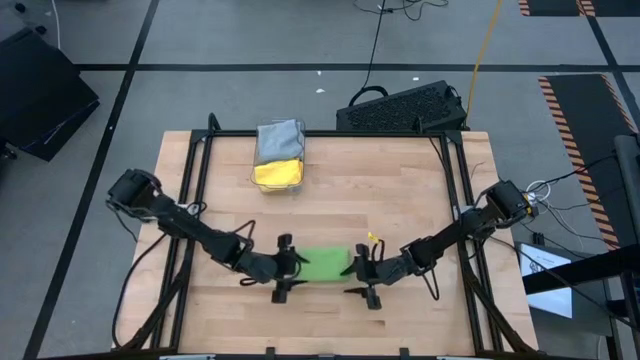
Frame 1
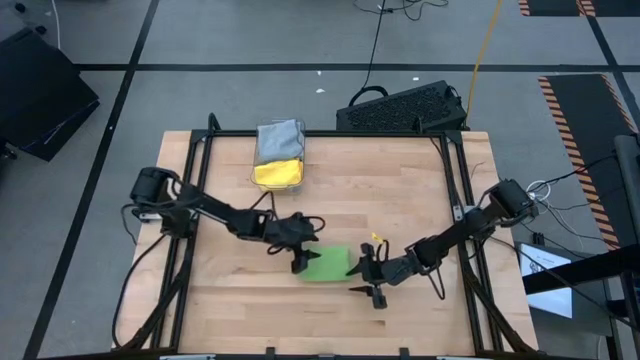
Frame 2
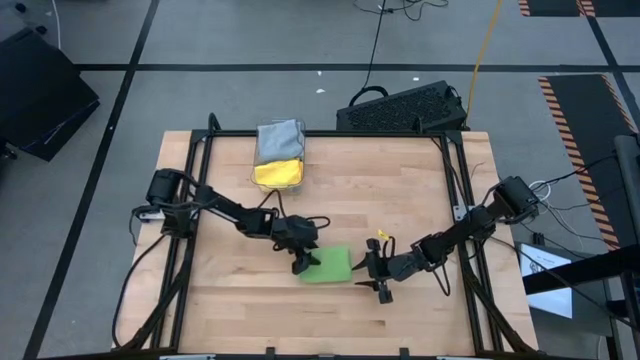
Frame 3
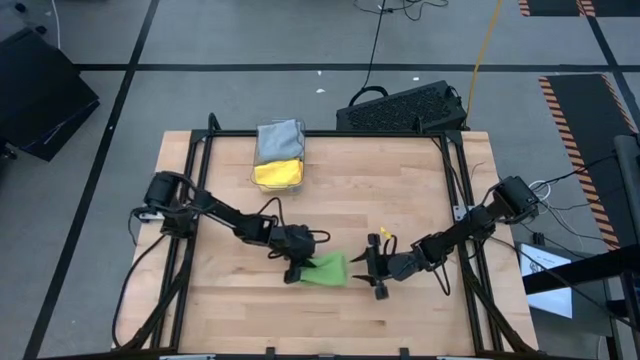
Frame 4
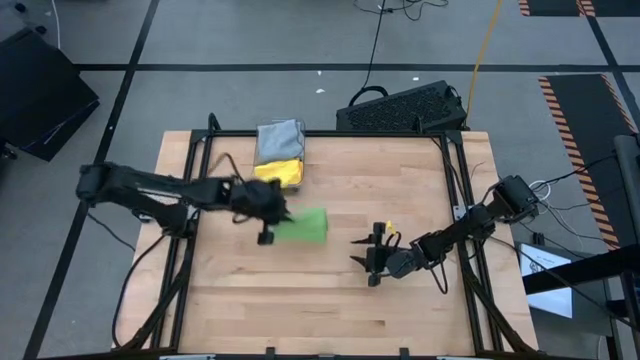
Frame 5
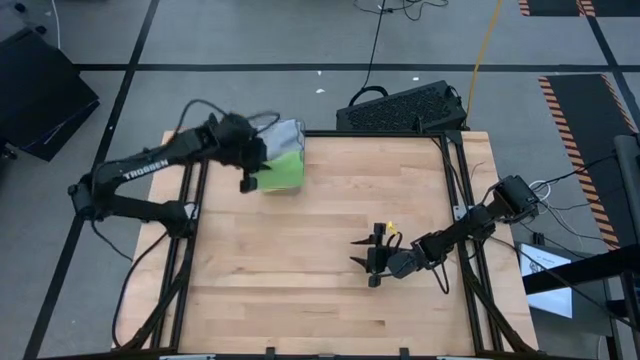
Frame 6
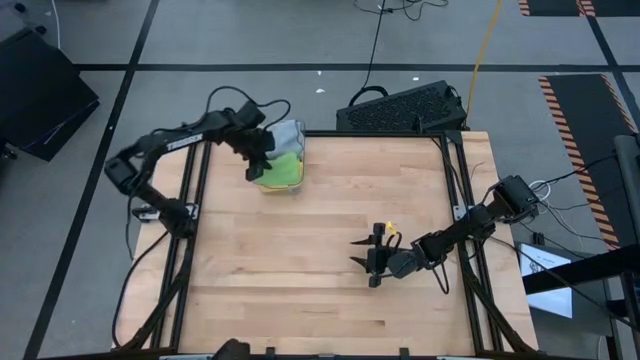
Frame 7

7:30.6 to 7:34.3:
Task: Fold microfiber towels
Put the green towel into the transparent bin

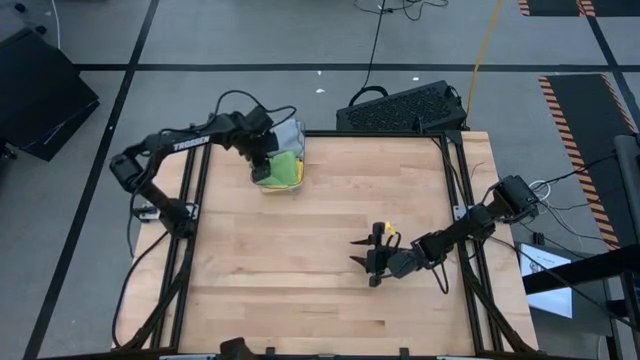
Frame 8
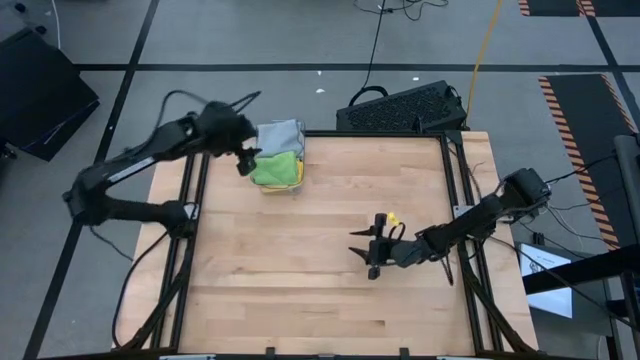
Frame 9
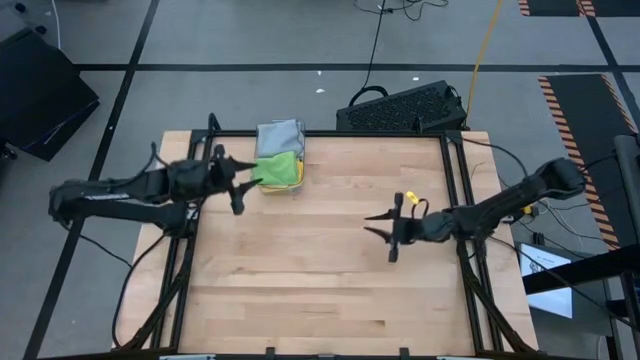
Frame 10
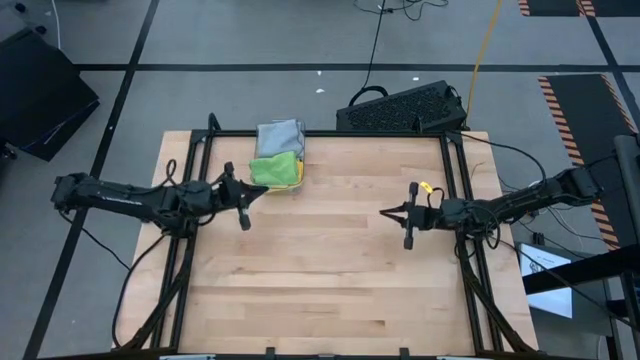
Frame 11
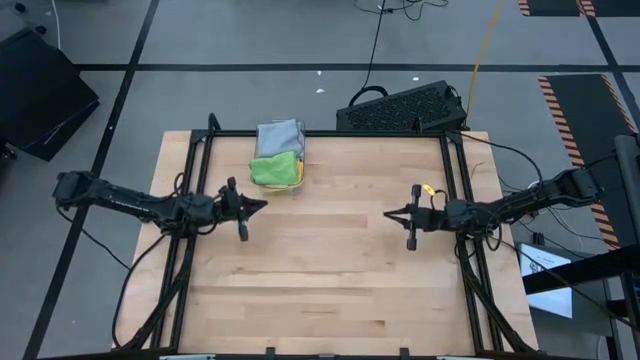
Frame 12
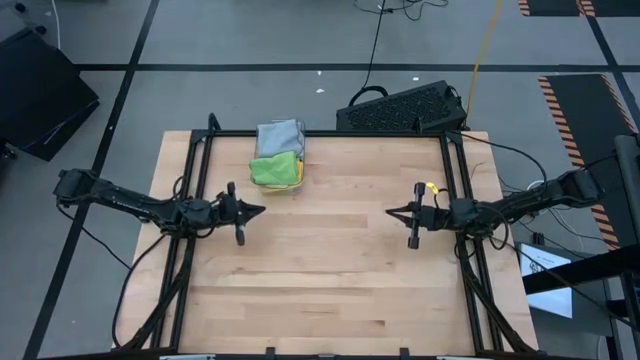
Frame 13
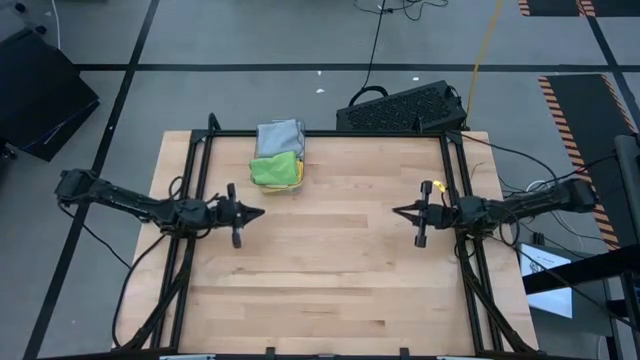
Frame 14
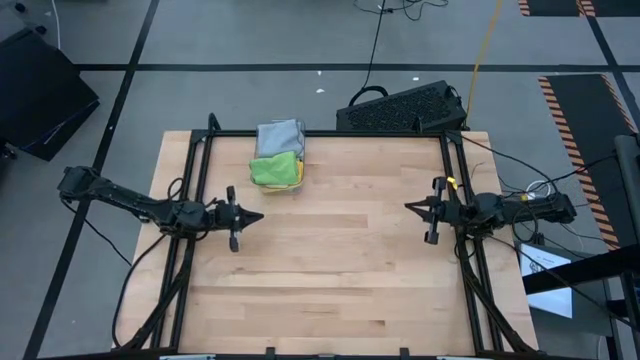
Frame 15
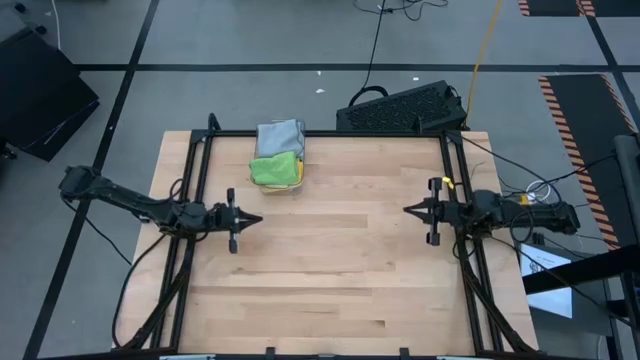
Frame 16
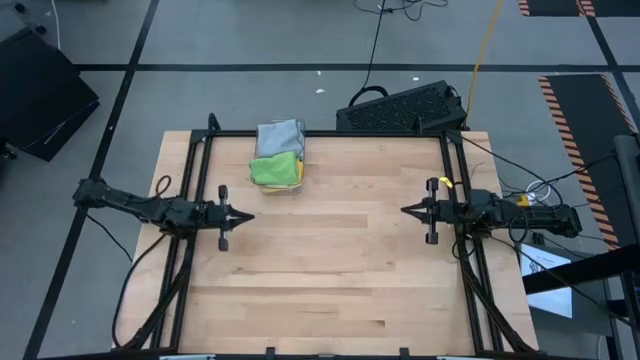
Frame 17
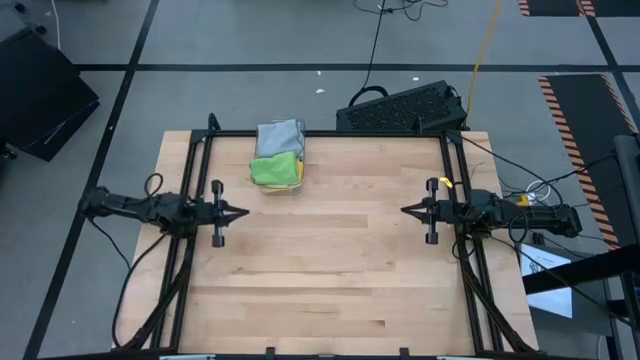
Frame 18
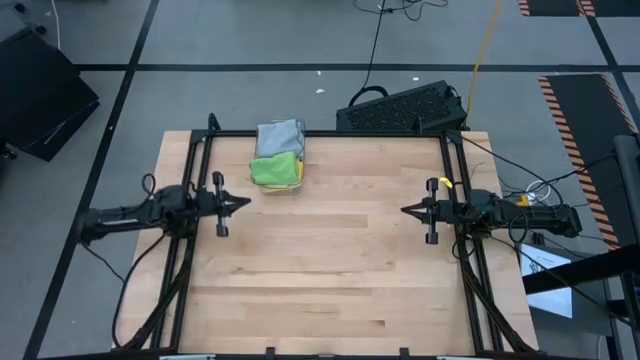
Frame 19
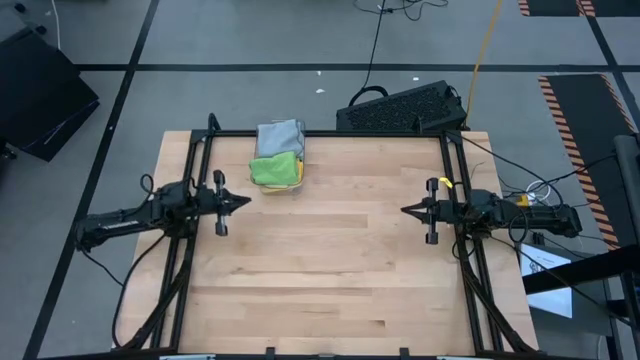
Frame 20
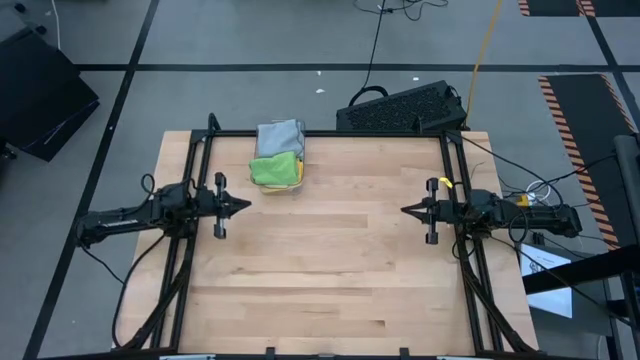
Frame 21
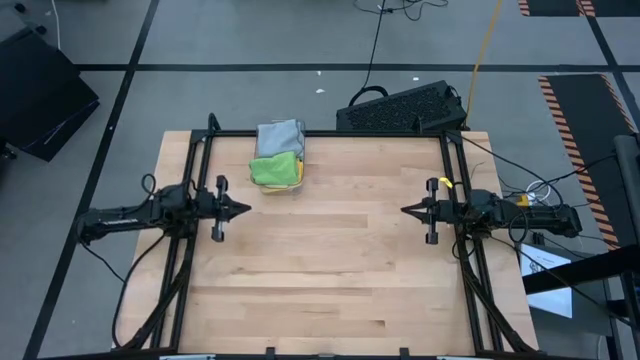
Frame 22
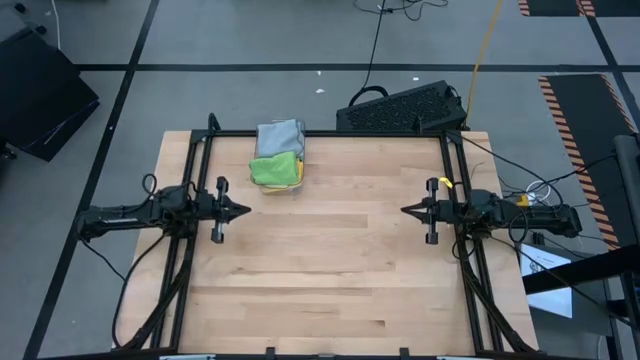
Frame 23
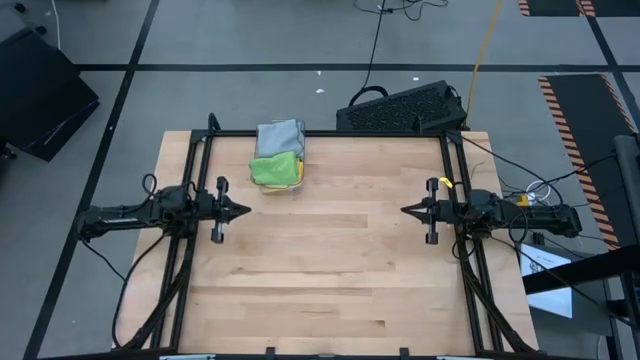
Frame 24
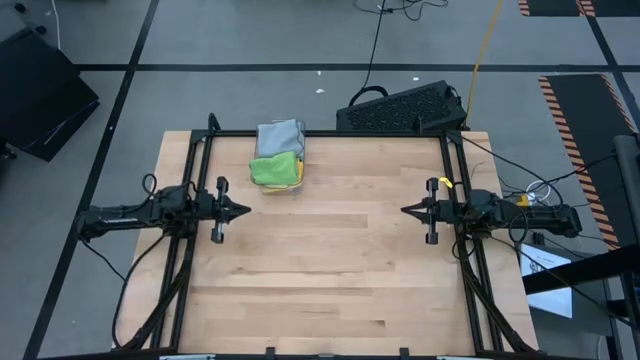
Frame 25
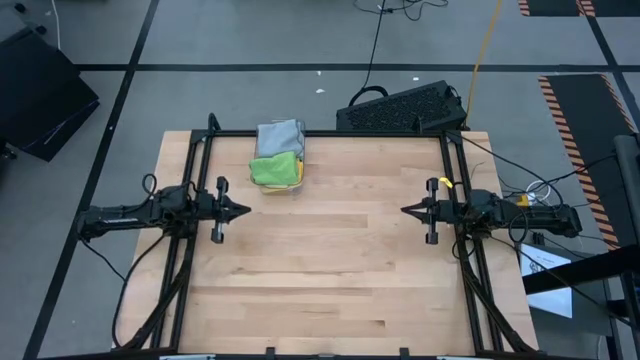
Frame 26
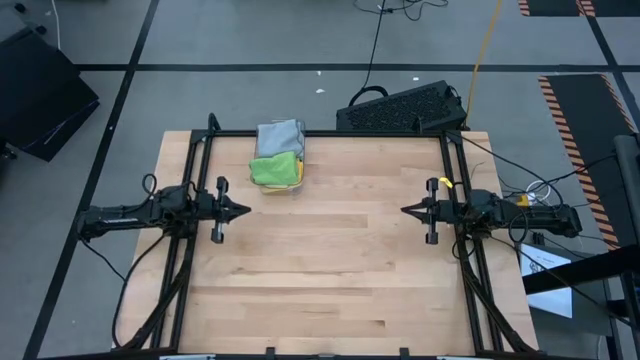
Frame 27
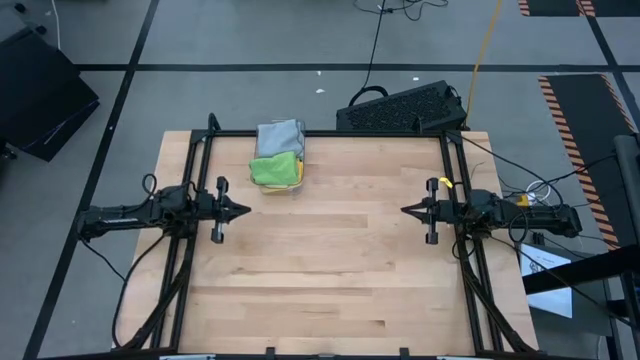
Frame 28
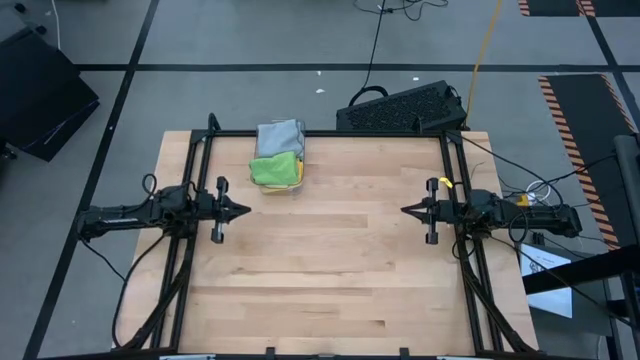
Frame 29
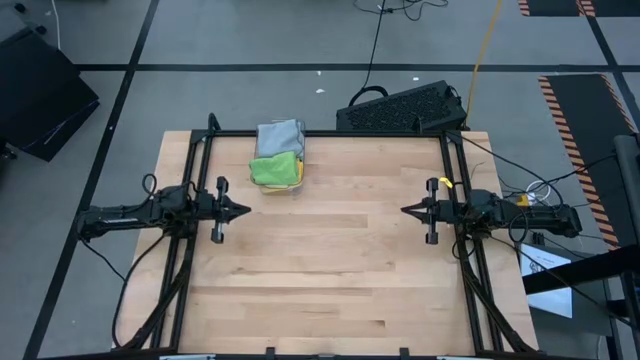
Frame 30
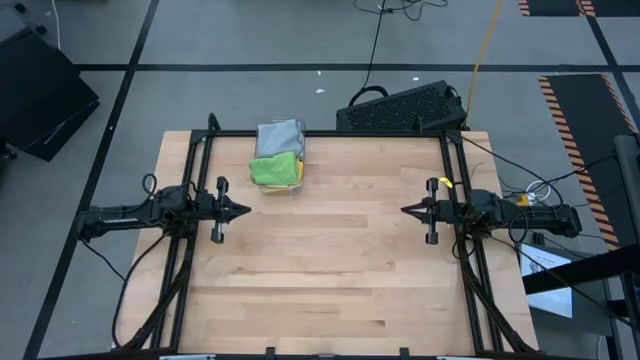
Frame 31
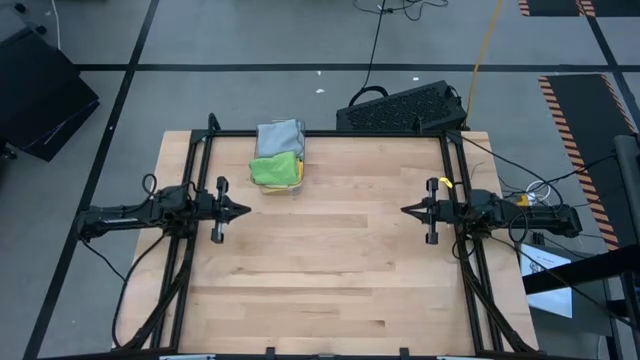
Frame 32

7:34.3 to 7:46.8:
Return to Home Position

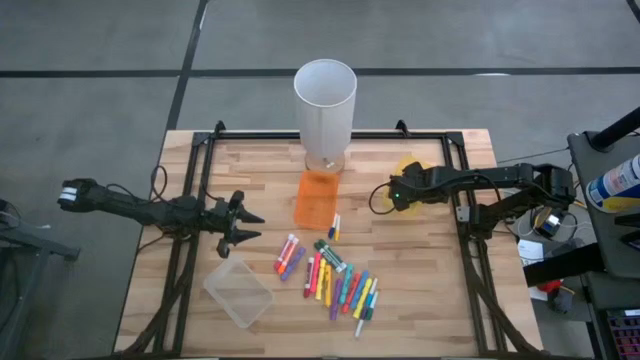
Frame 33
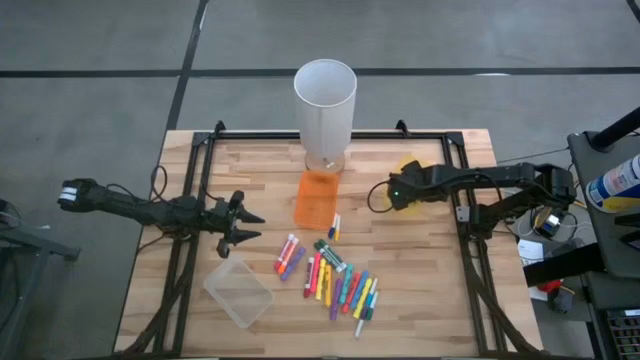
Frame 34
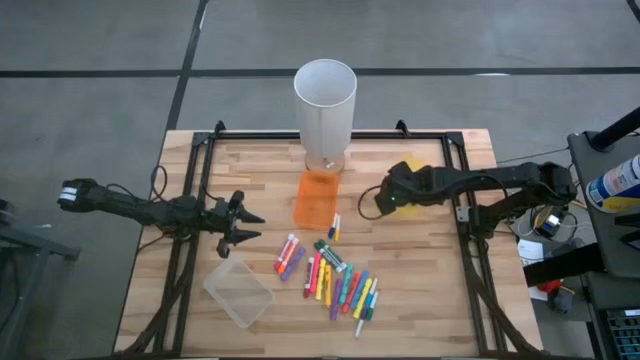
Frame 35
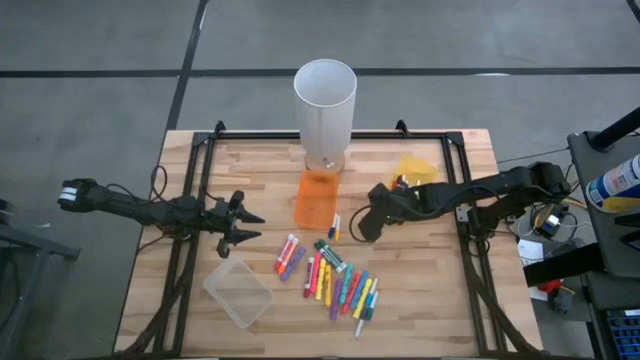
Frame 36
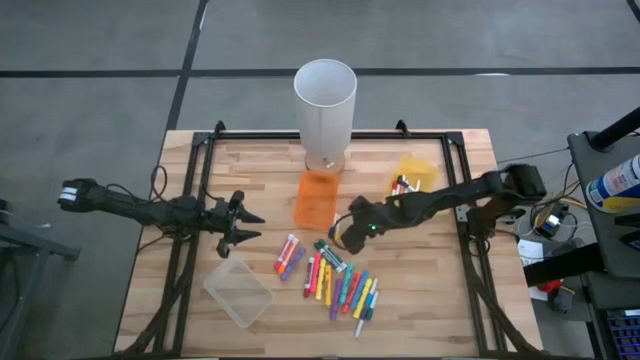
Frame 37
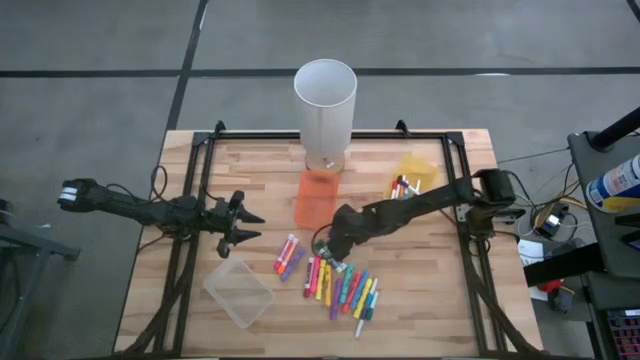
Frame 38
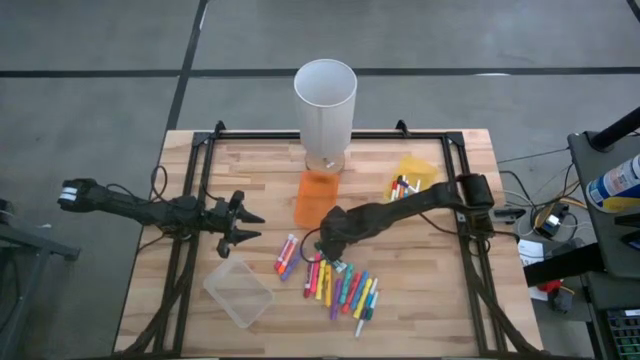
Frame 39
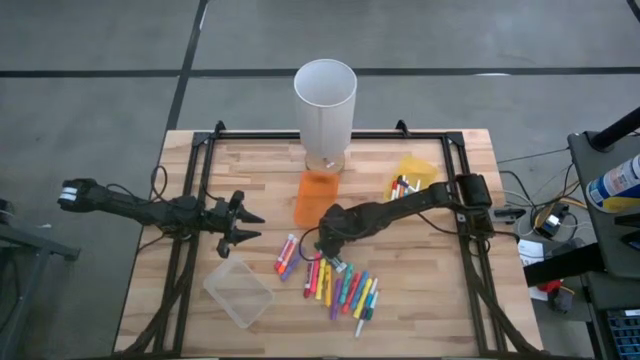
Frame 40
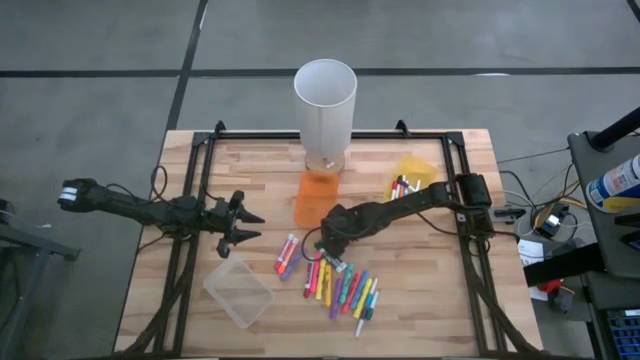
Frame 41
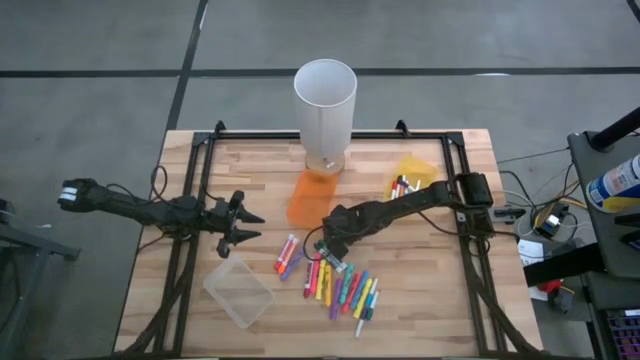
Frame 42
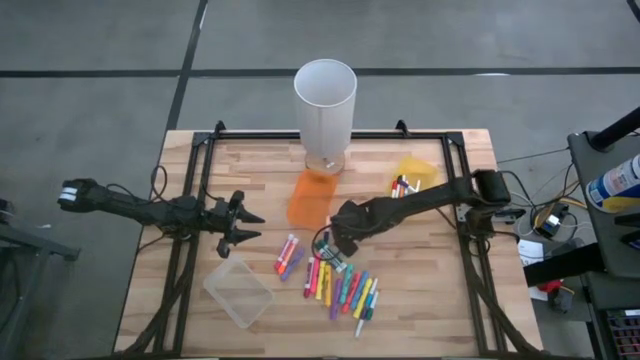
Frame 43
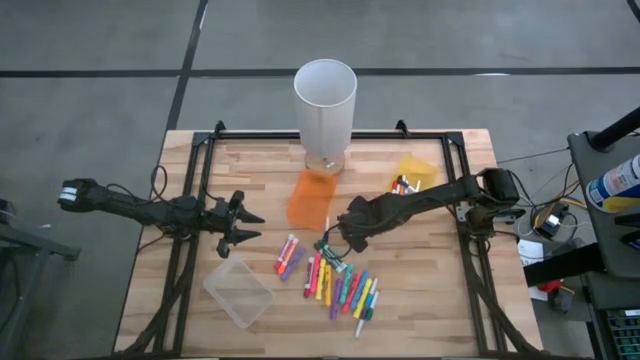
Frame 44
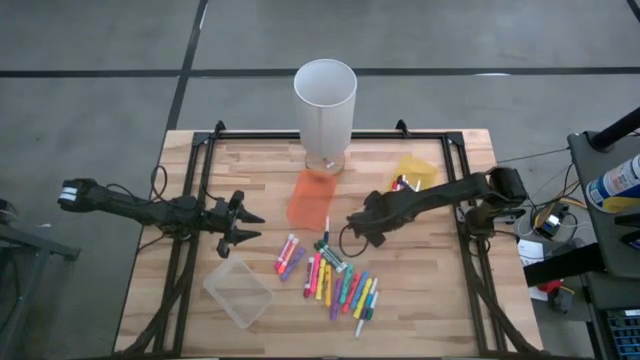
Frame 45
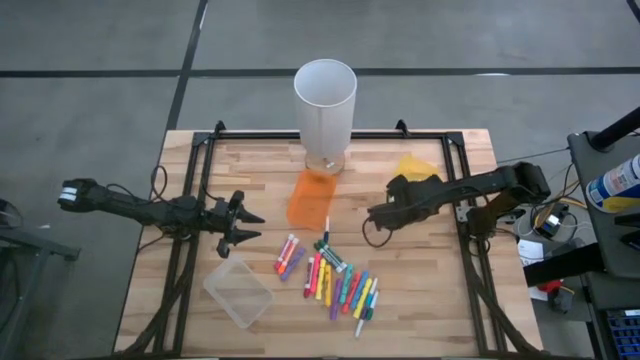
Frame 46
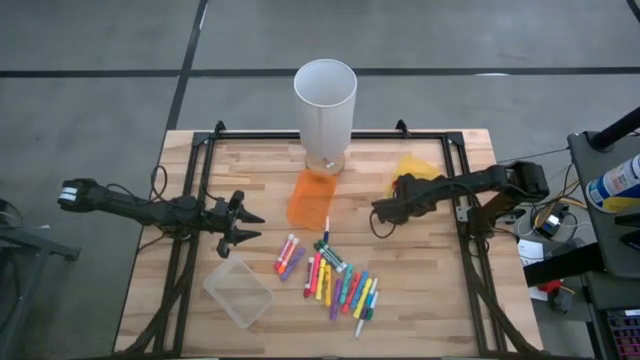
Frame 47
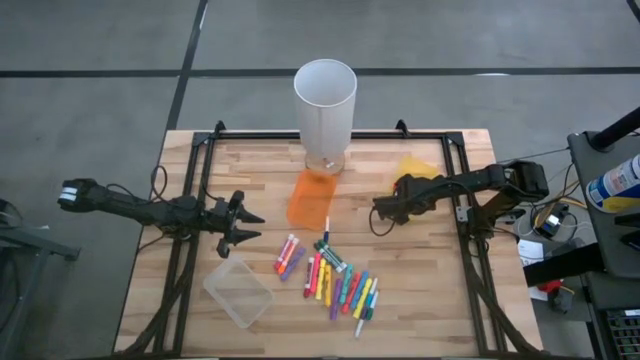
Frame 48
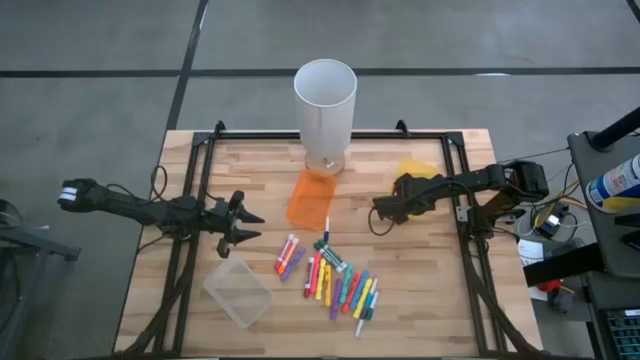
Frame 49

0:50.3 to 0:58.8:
Task: Pick & Place Markers
Put the small yellow marker pen into the yellow bin
